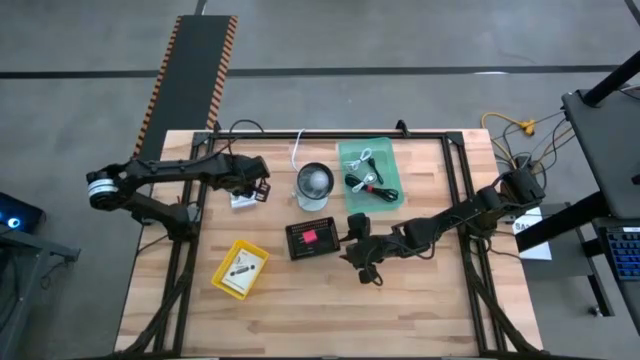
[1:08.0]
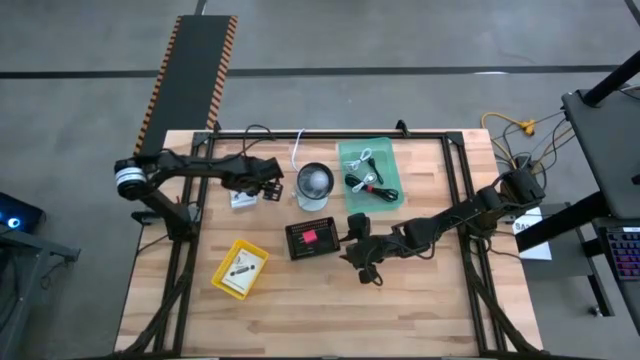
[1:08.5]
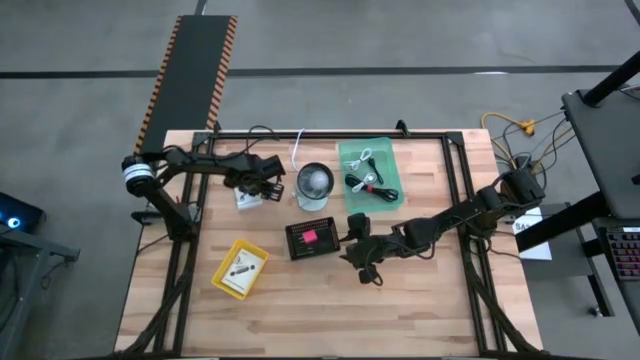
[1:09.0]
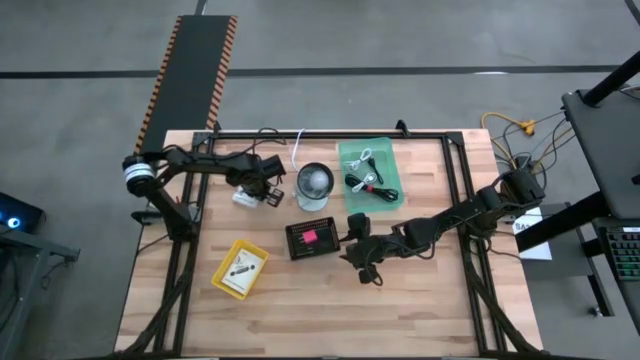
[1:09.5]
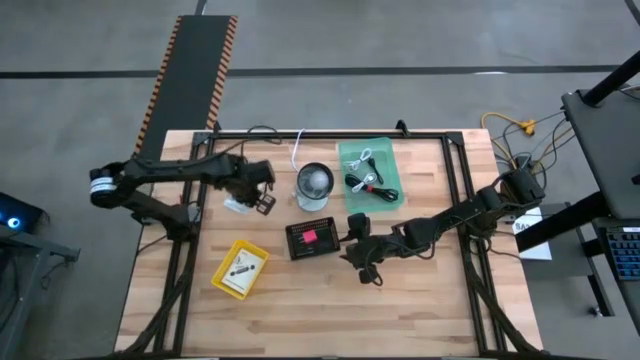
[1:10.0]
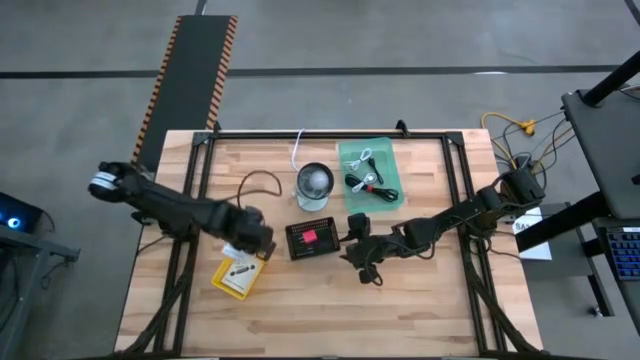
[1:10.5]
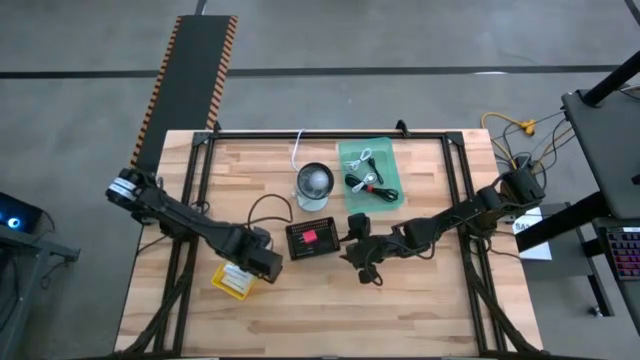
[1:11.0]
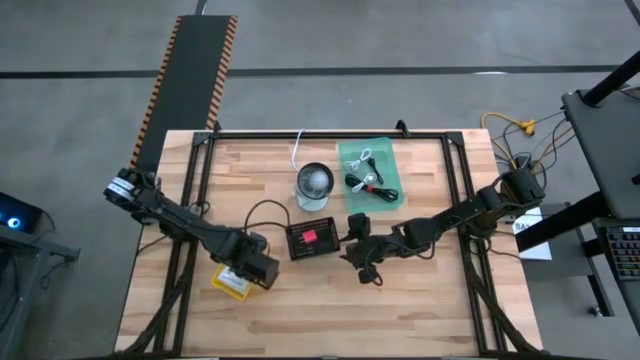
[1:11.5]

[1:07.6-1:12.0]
Task: Pick and place items into bin
Put the top white box into the yellow bin

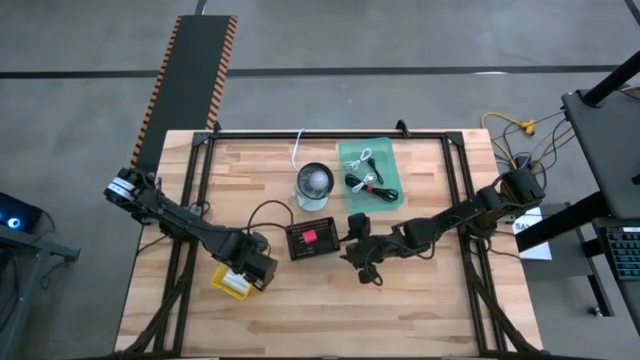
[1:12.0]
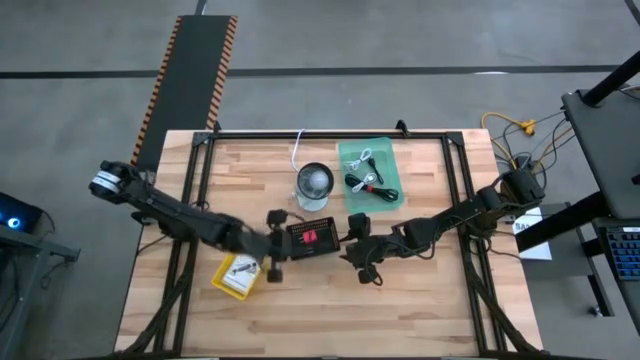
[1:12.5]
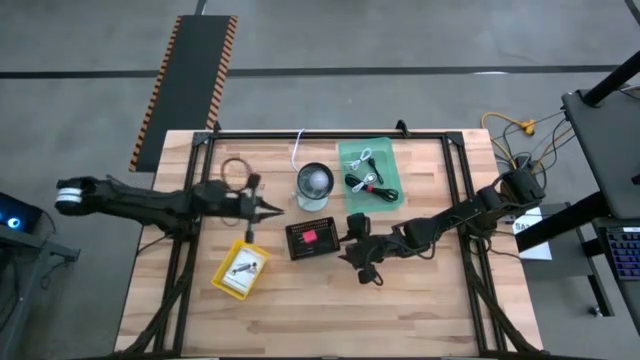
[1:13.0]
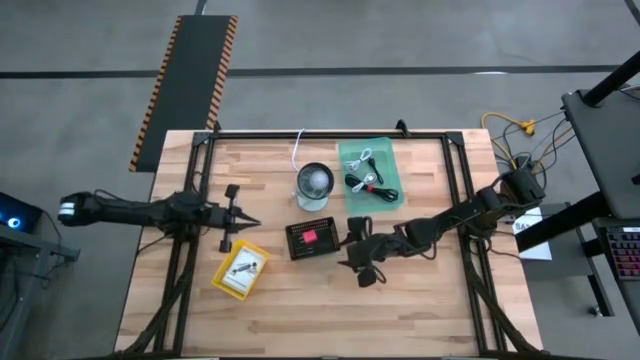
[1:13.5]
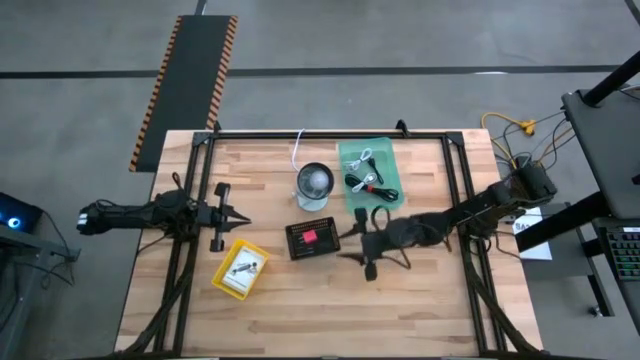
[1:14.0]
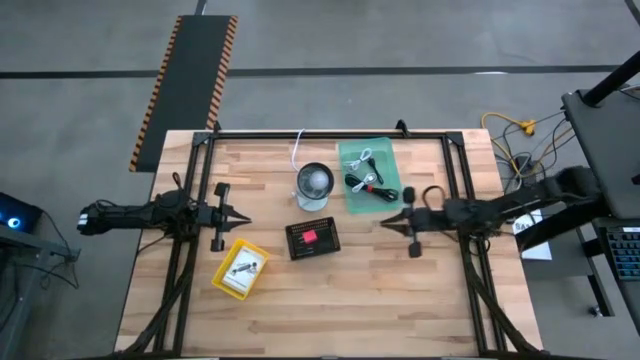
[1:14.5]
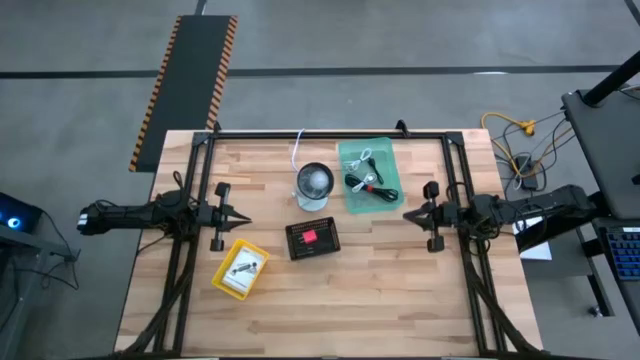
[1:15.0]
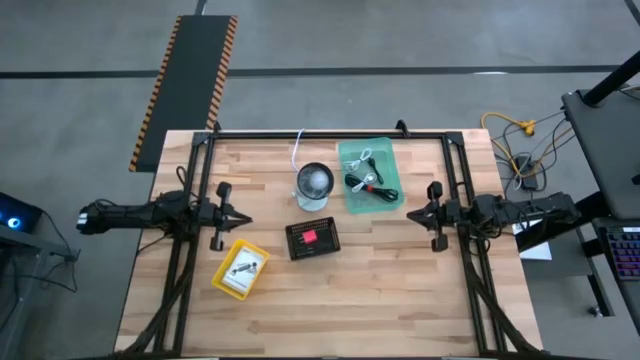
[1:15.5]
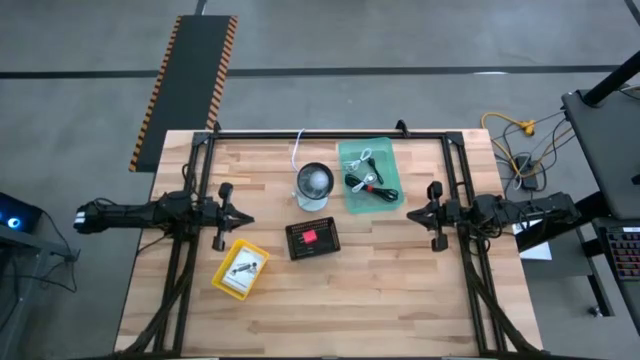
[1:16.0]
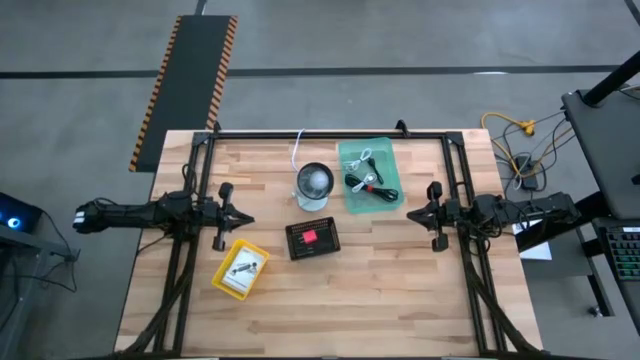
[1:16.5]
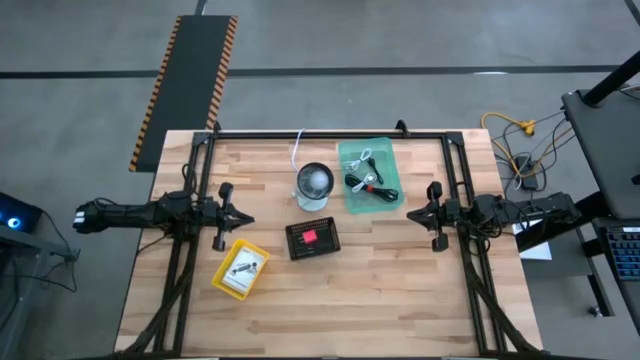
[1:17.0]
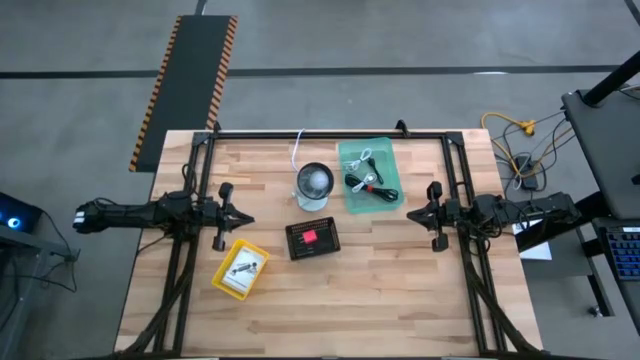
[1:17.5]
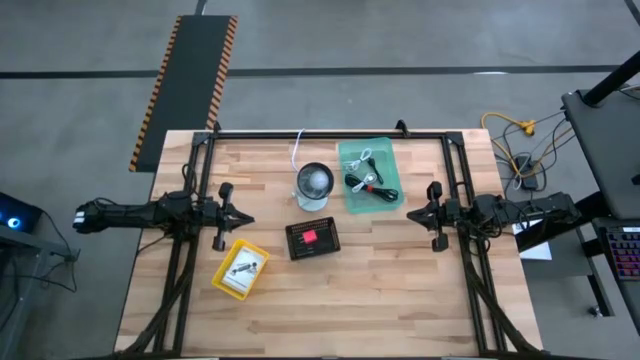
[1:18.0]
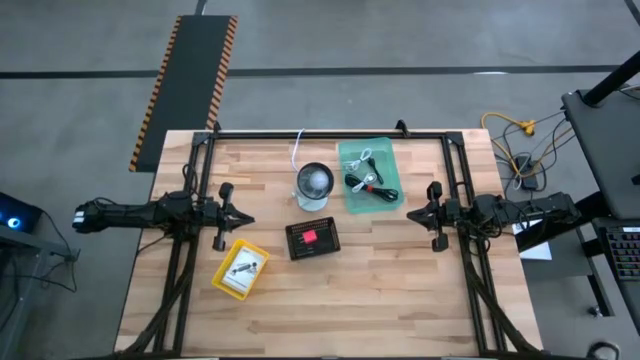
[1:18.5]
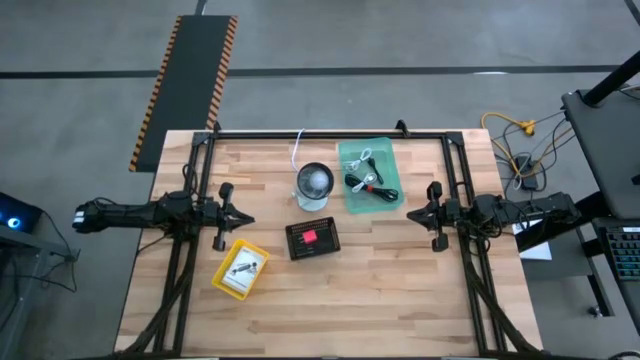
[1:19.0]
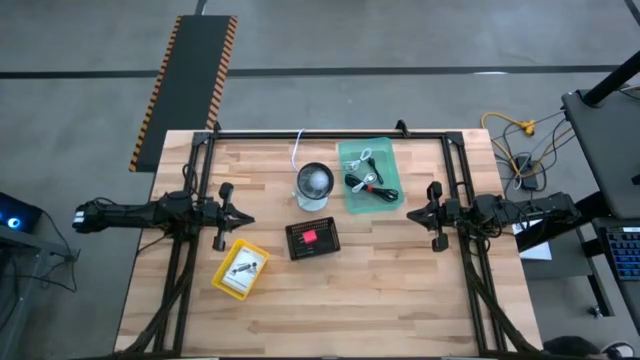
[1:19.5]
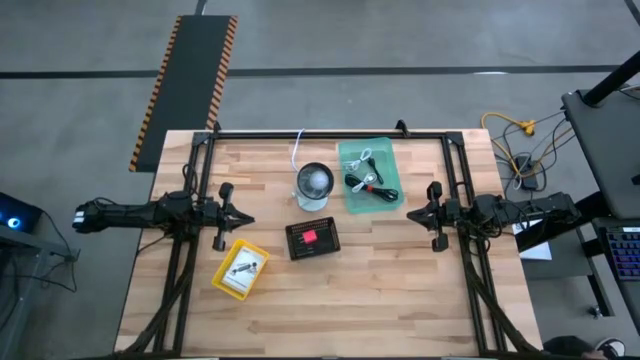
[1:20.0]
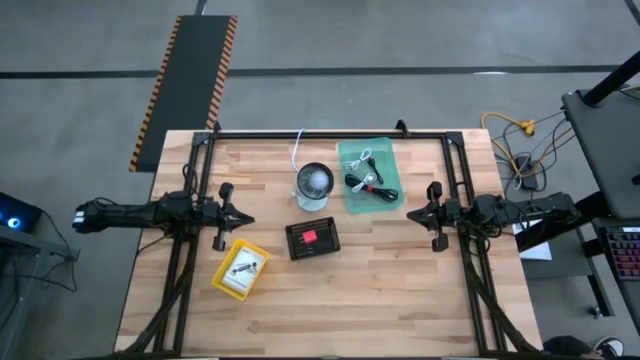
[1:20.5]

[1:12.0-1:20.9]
Return to Home Position

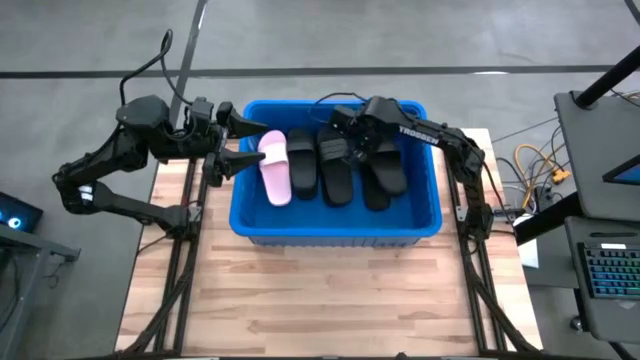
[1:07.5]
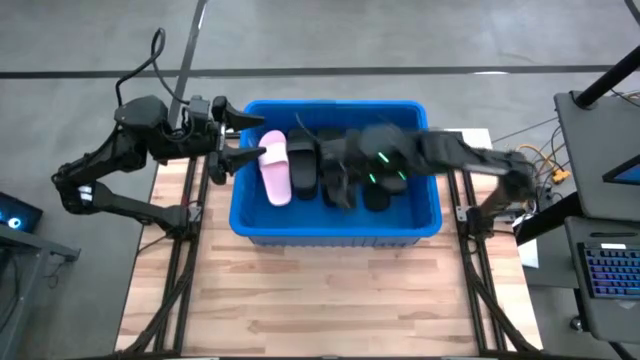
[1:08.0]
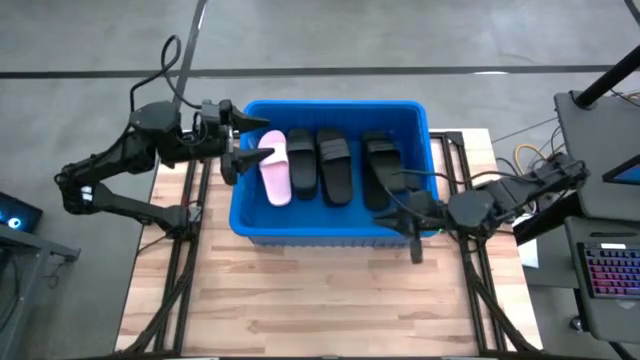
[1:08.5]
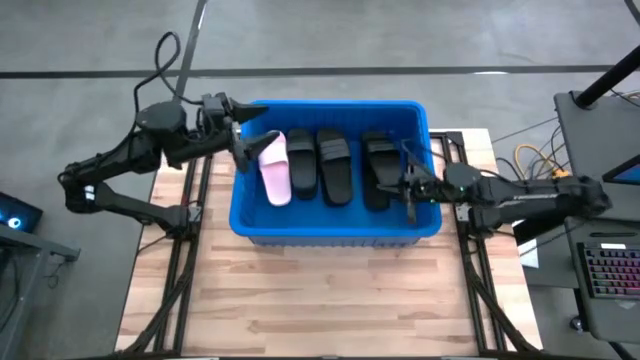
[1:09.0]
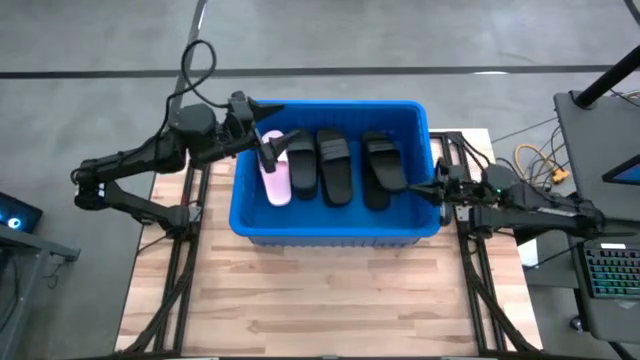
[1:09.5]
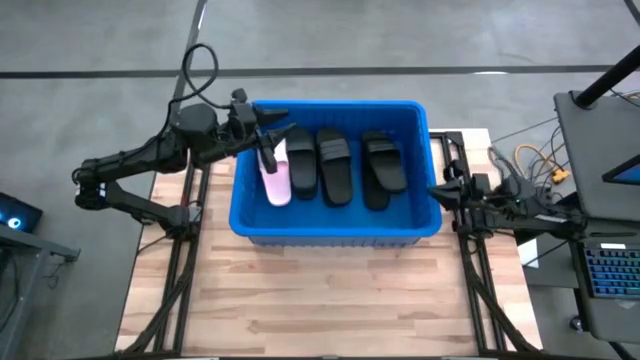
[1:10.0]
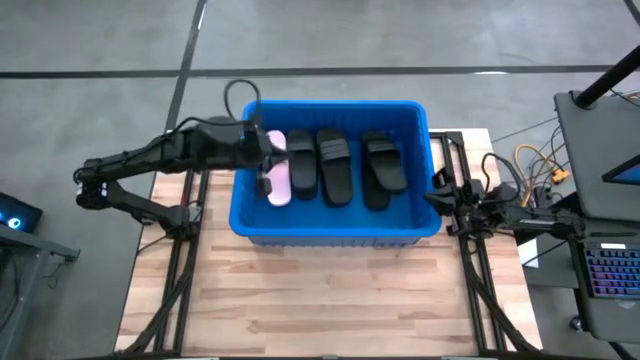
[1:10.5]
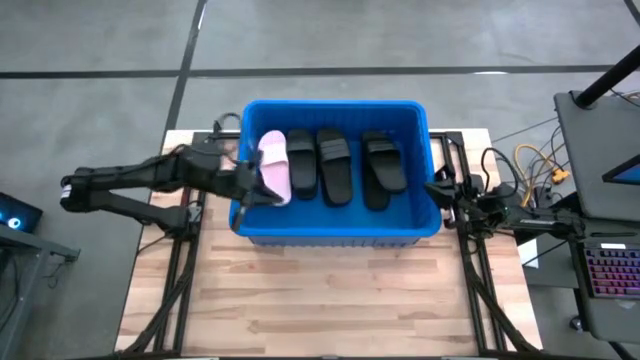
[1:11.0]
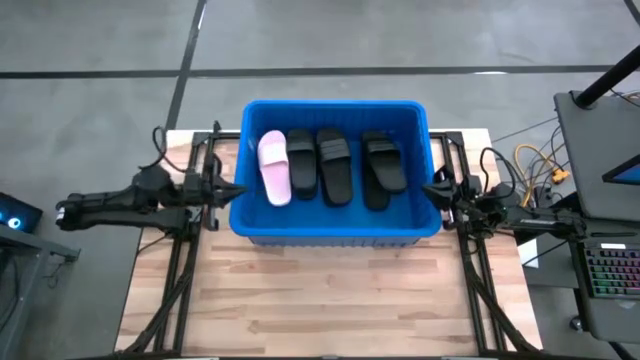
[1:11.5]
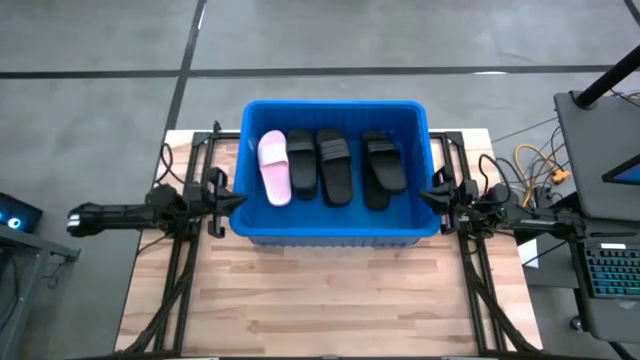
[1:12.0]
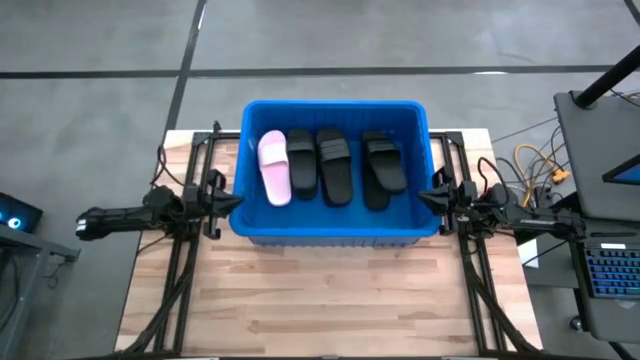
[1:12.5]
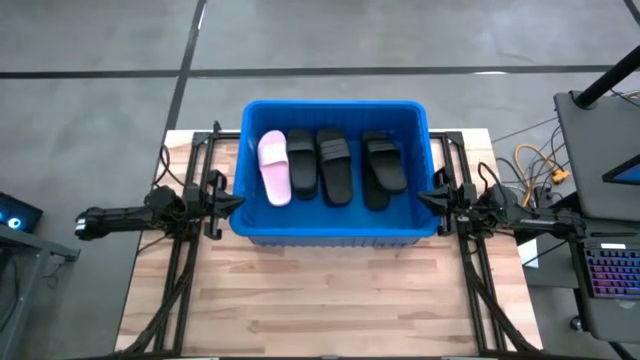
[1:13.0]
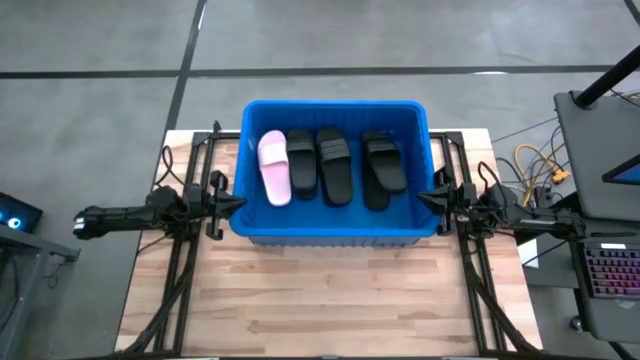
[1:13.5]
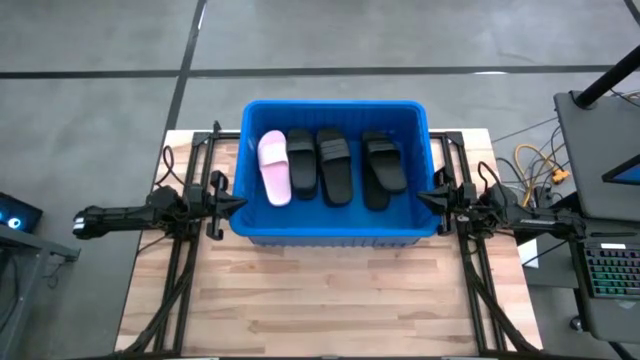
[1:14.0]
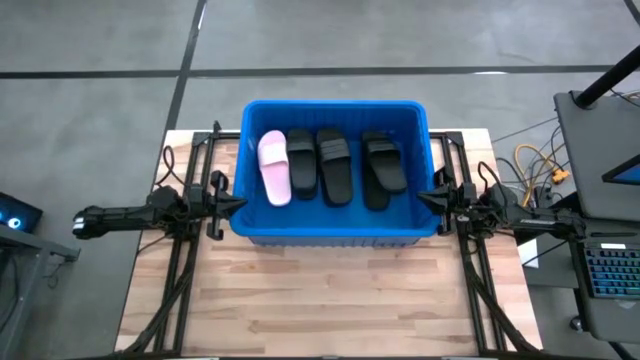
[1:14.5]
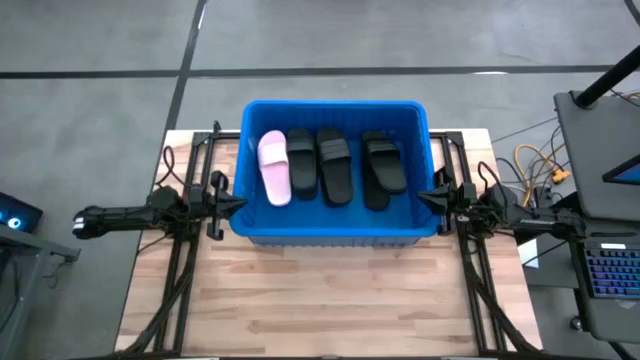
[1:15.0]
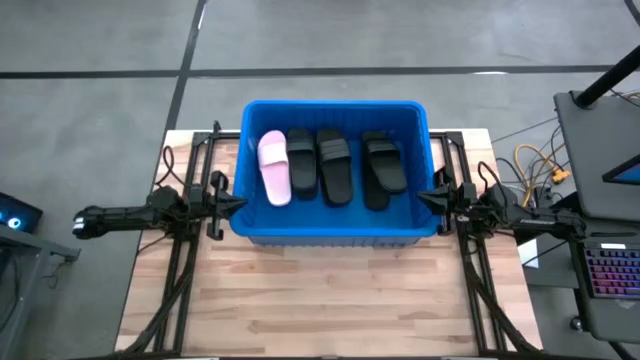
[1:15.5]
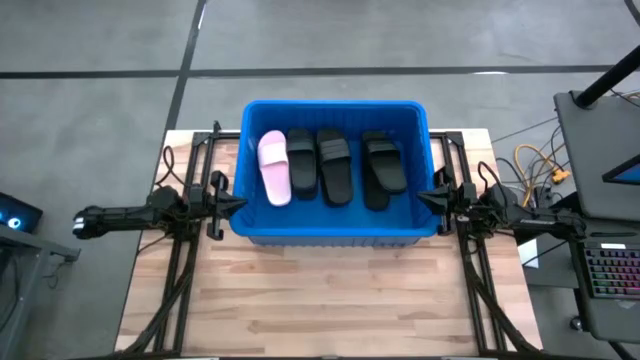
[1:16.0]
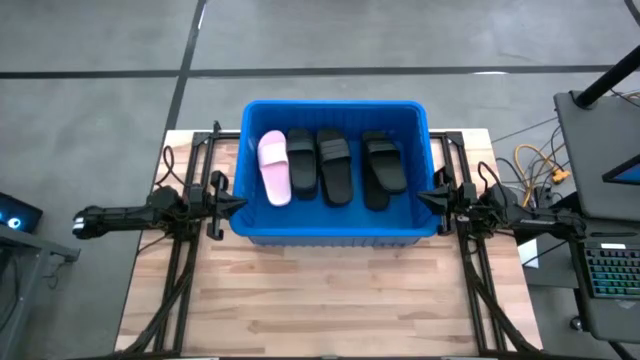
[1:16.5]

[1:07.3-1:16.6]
Task: Pick and place slides into bin
Return to Home Position
